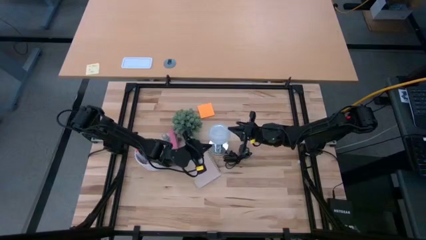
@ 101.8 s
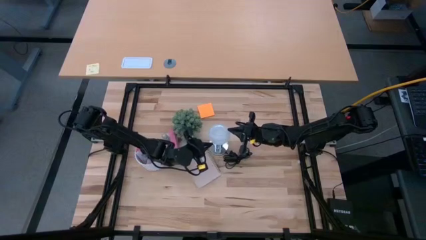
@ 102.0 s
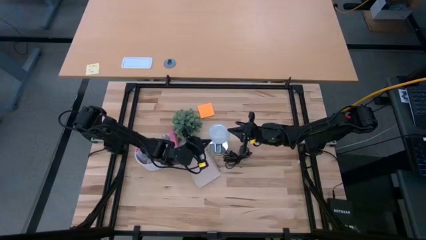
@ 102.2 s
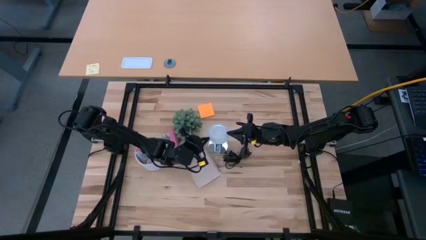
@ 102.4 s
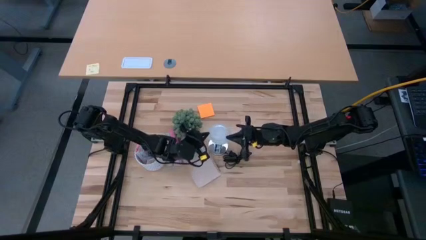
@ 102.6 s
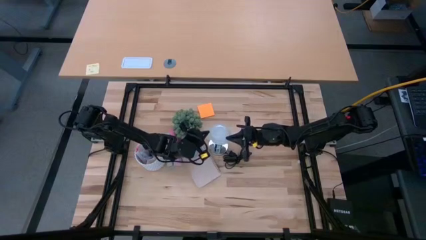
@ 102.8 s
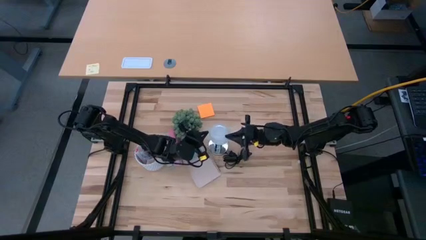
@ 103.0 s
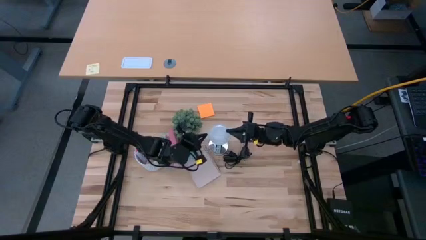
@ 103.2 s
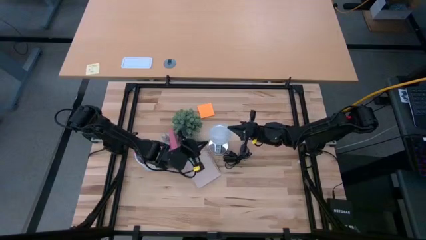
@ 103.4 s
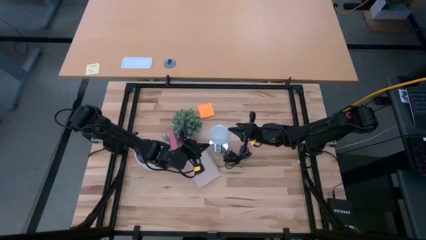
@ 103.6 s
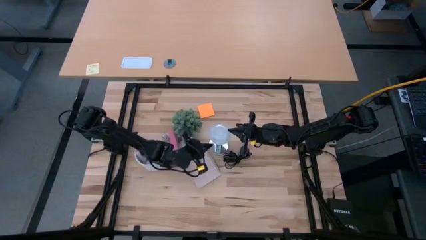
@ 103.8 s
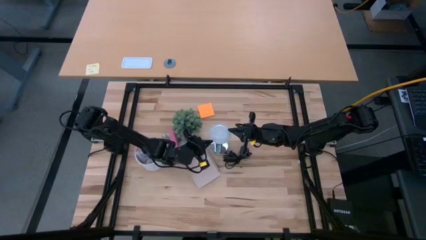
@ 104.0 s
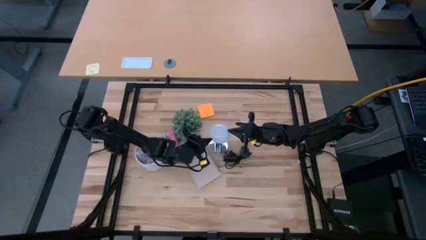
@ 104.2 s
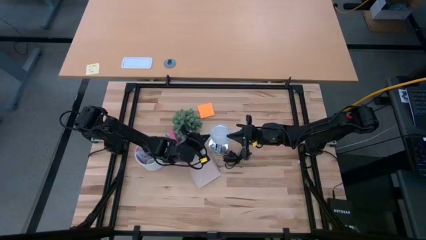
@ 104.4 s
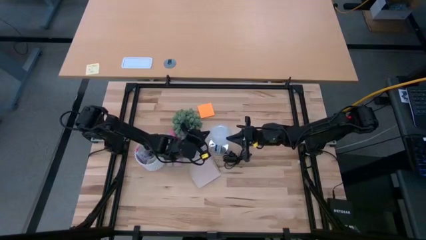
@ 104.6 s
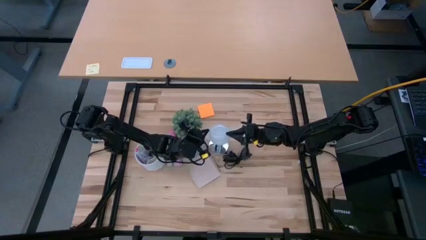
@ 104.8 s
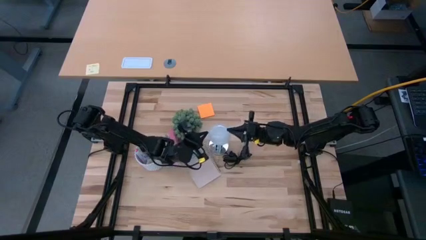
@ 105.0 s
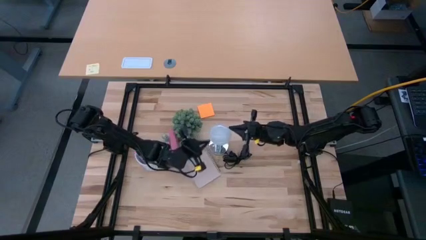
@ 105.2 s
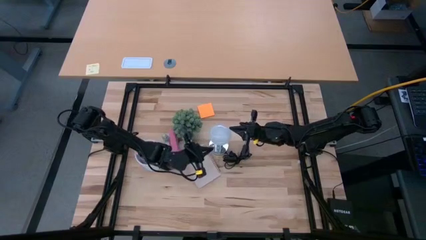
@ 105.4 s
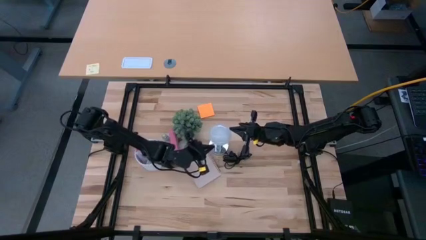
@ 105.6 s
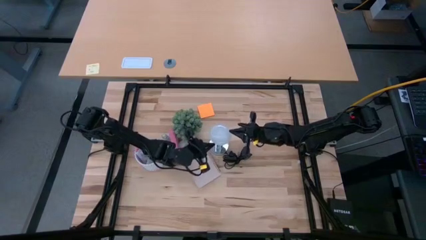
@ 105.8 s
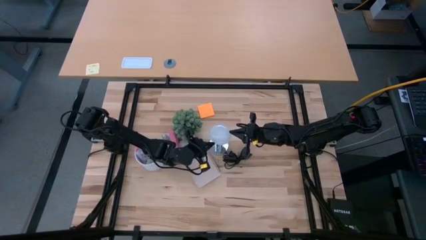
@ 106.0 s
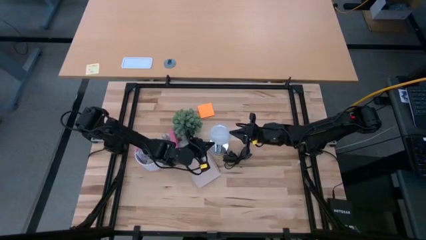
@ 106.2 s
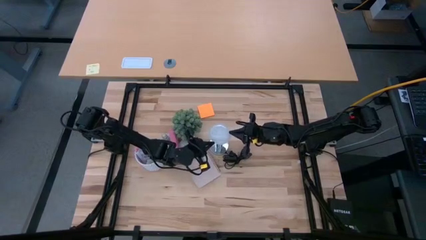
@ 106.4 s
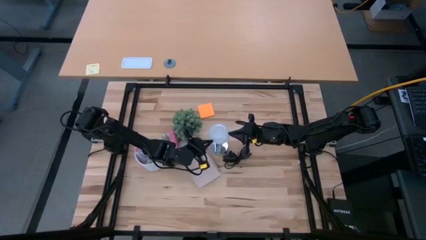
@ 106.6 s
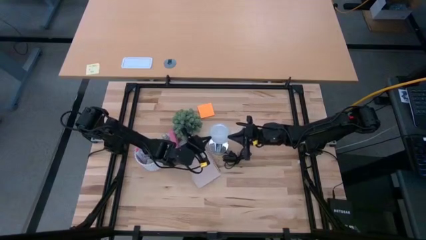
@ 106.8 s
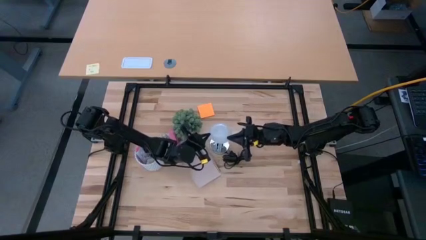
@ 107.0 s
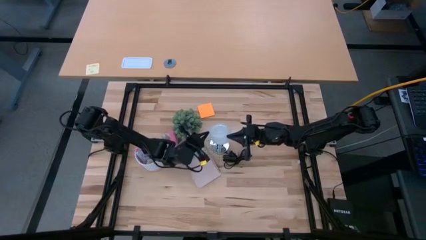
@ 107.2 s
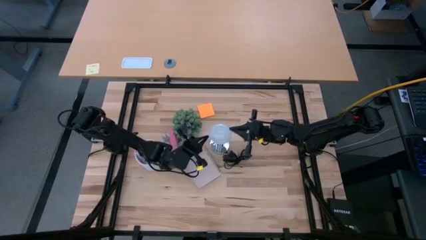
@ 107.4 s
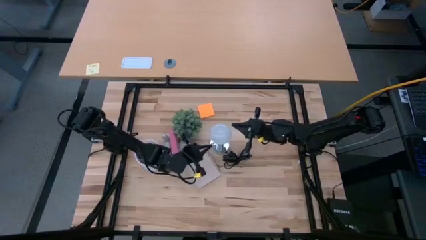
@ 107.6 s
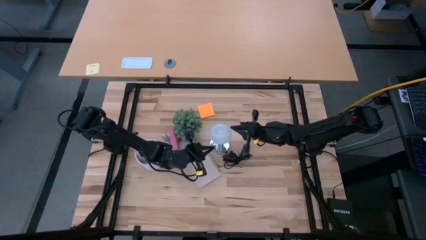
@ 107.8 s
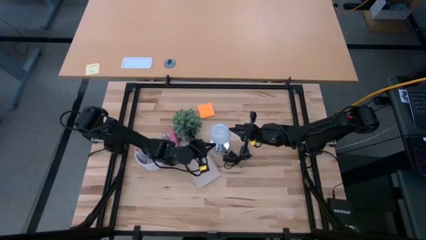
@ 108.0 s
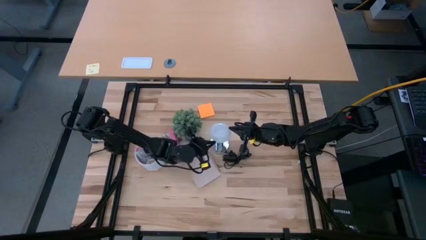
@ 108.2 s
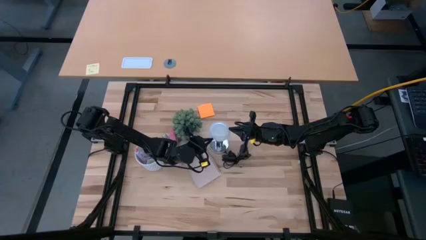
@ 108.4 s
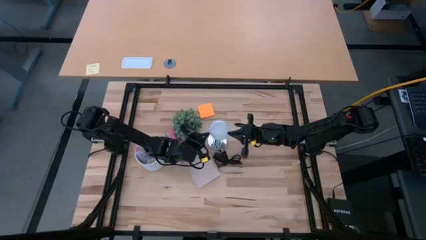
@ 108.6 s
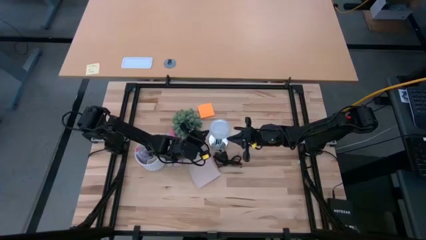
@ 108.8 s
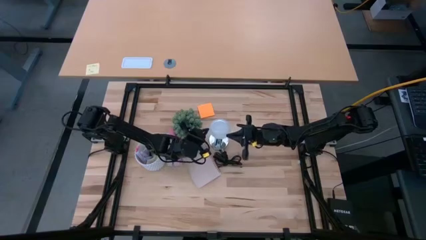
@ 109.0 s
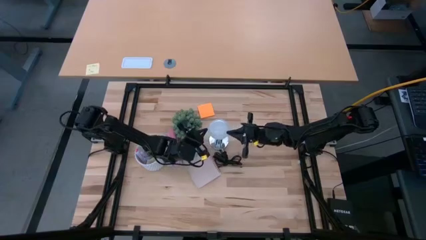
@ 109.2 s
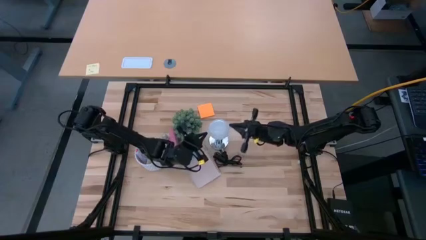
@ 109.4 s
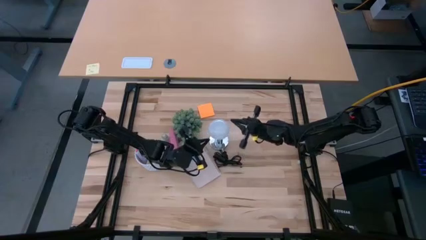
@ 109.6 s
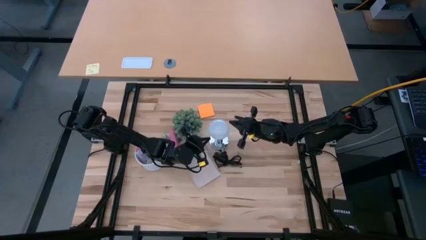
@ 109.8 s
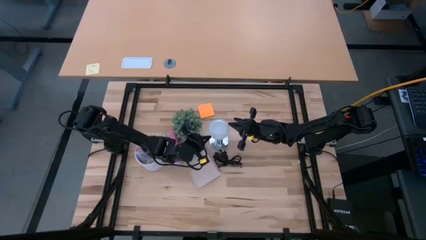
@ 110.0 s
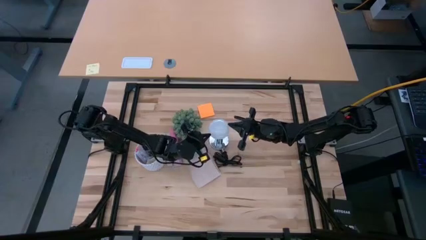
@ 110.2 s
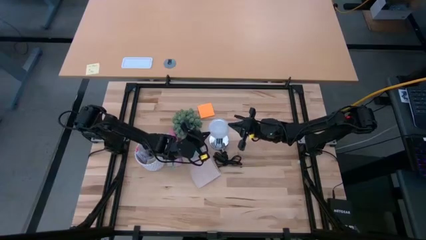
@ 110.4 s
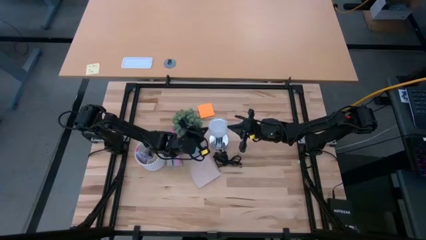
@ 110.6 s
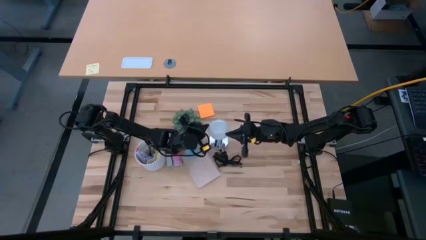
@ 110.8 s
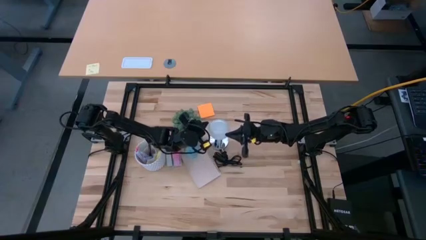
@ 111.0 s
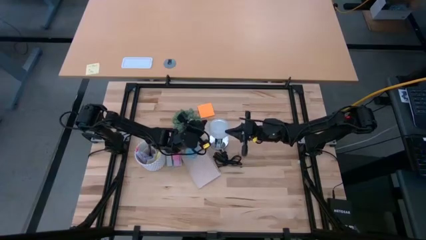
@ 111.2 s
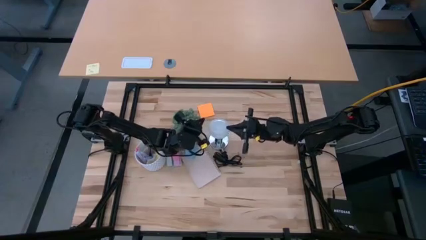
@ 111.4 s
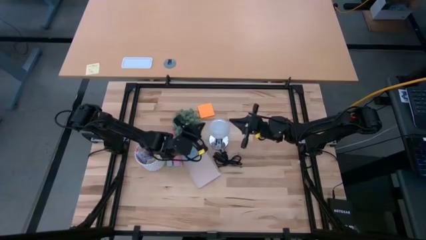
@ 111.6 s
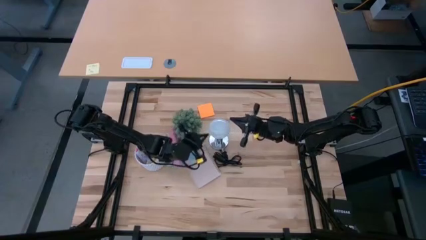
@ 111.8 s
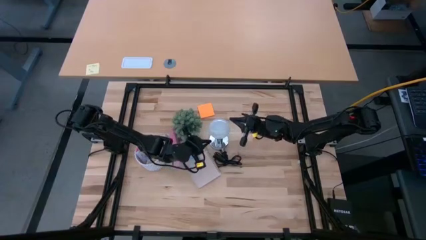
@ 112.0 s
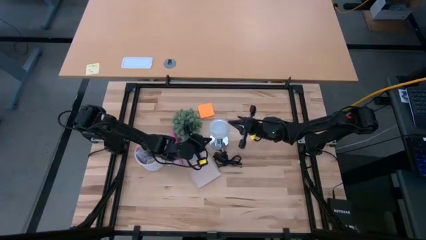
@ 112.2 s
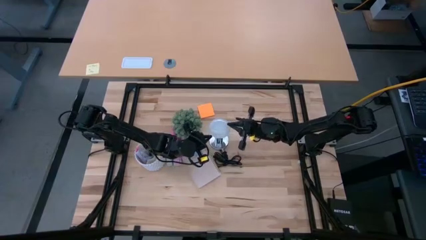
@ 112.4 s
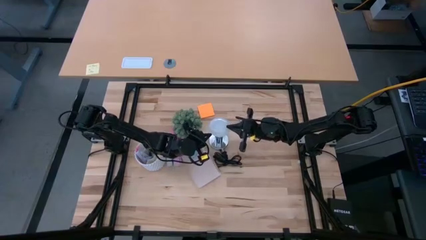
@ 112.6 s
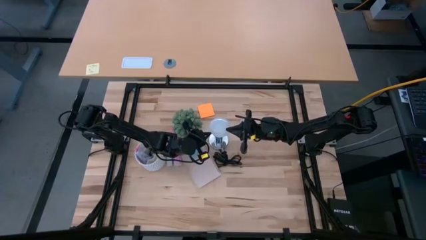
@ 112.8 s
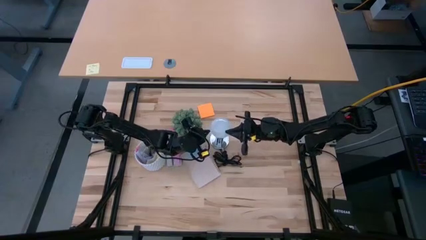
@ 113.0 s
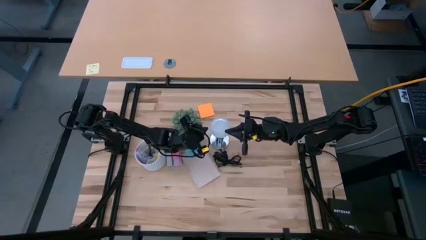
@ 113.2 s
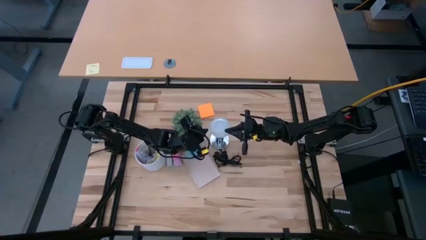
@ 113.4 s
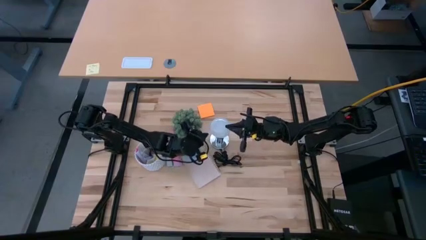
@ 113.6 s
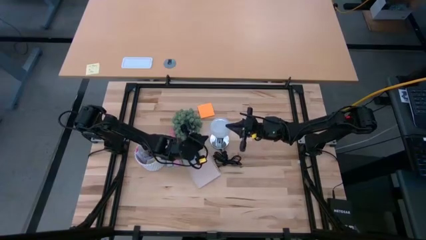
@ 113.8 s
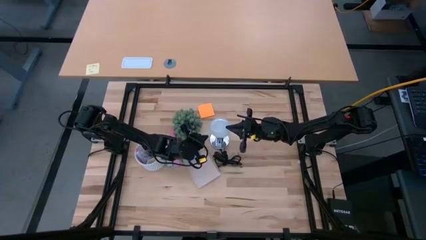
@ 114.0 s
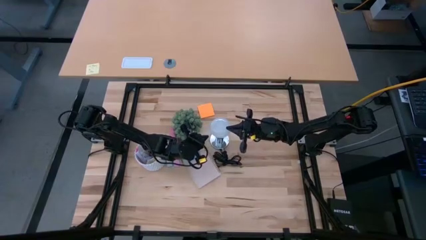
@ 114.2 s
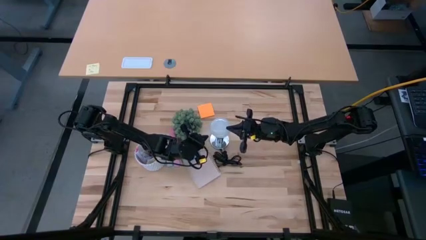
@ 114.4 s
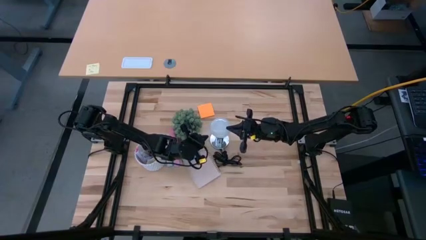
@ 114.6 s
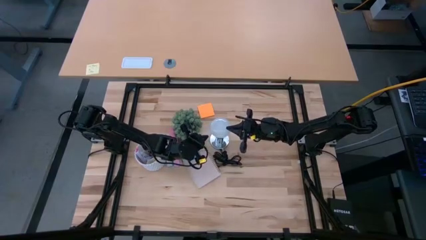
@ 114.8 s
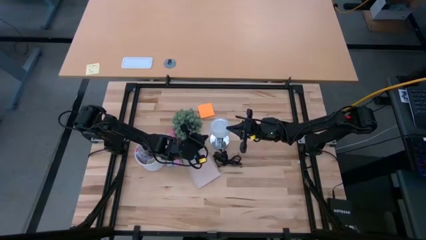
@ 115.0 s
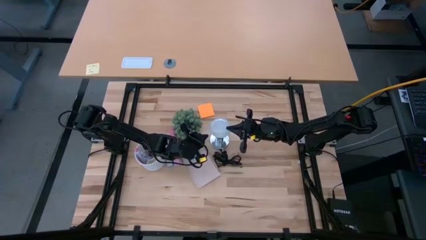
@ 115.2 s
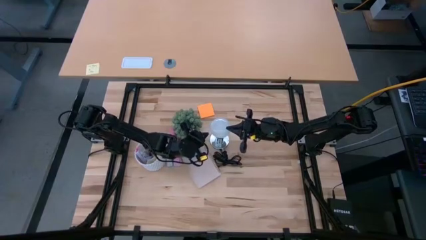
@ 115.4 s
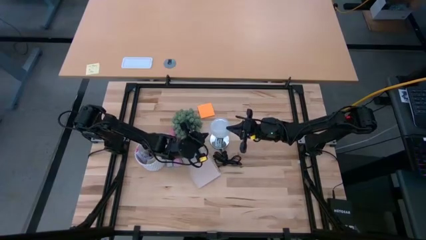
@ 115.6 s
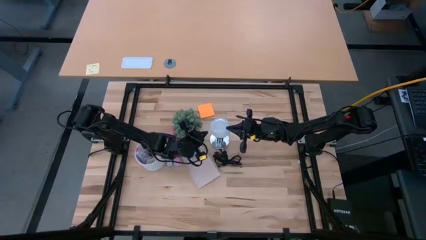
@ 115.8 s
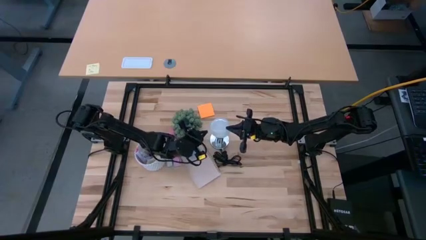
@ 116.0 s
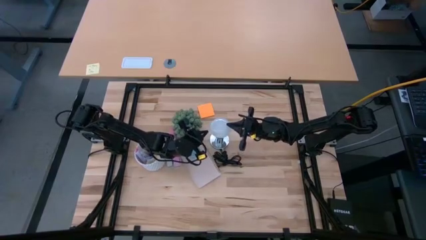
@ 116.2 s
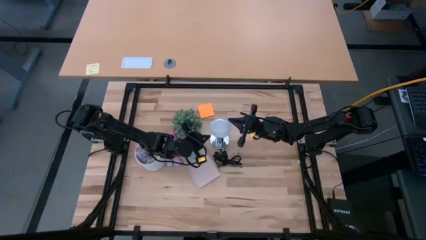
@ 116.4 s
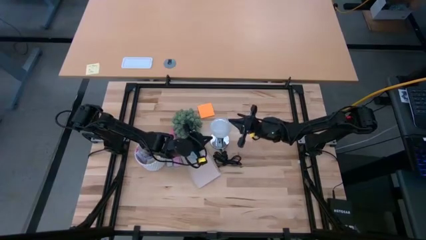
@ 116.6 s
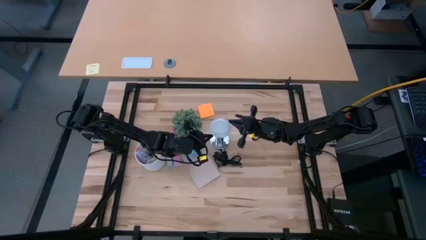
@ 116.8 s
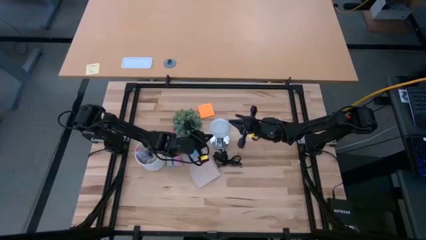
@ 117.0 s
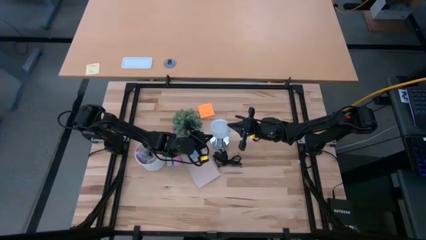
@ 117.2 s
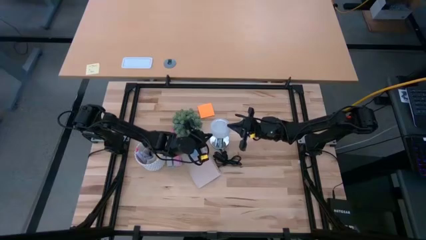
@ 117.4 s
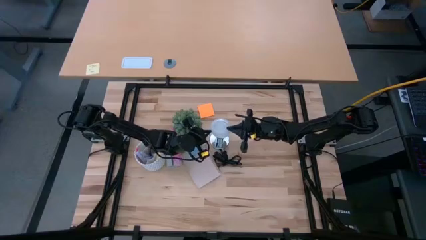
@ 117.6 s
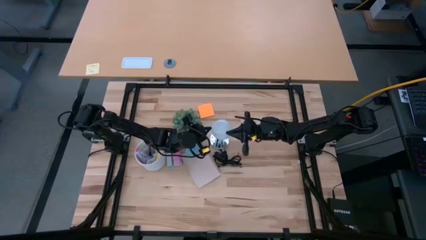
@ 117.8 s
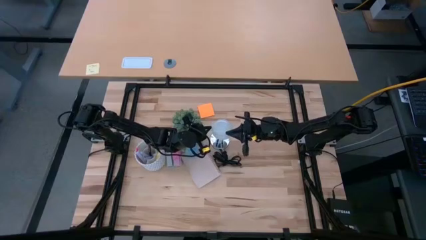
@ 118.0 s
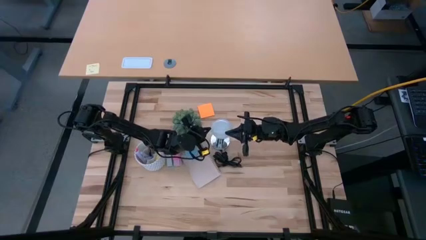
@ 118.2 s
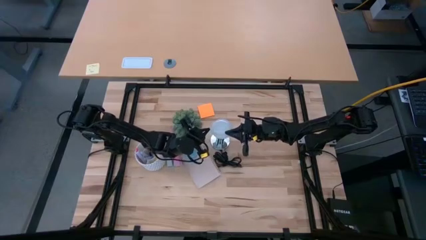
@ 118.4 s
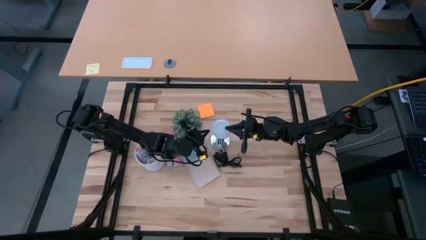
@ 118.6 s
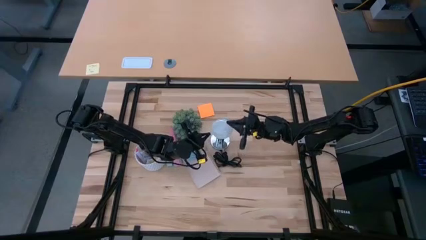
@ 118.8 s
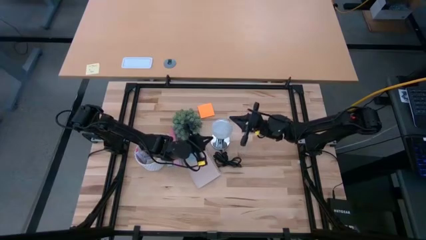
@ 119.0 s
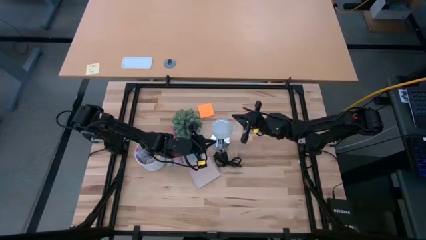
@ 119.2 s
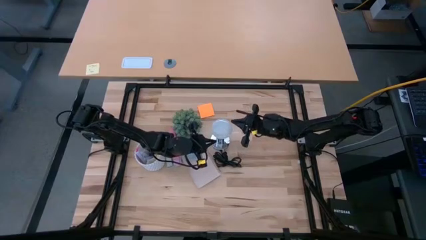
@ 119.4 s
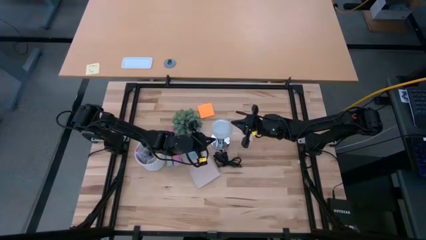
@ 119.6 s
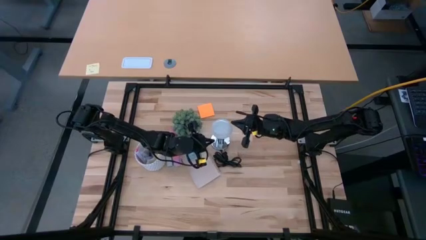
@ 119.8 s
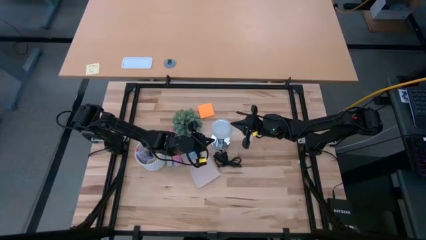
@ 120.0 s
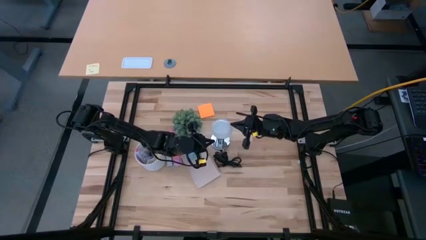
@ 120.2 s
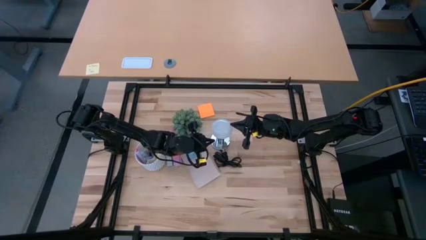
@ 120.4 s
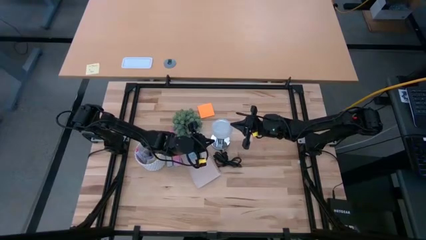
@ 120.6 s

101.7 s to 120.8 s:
Task: Screw lightbulb
Insert the lightbulb into the silver lamp socket
